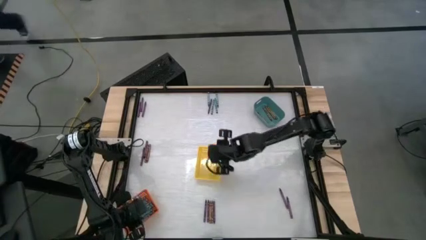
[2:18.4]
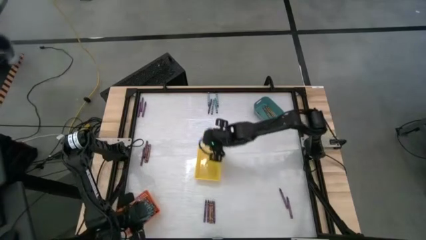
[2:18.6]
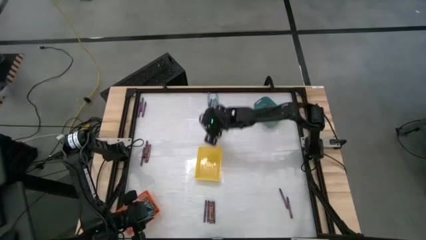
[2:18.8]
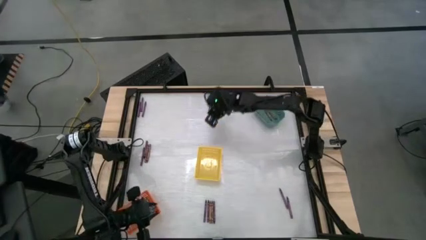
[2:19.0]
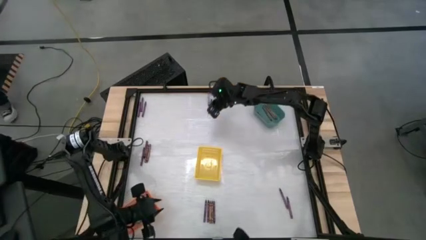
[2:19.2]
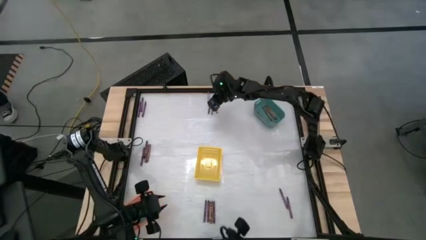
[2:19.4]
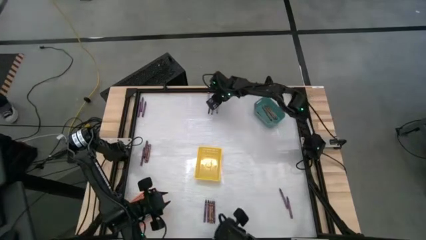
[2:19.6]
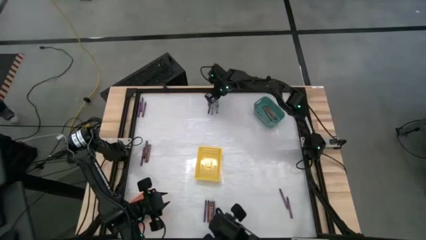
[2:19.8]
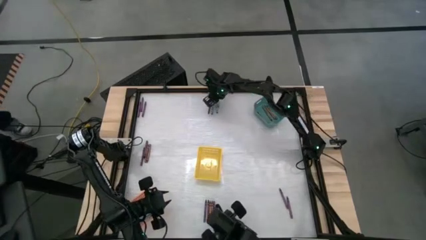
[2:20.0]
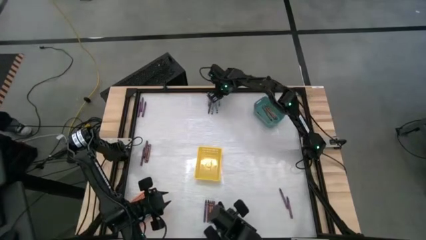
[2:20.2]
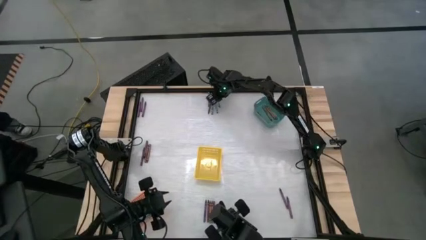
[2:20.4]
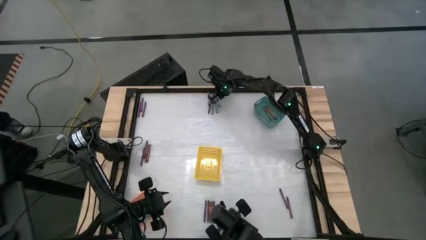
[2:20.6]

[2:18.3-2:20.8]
Task: Sort crayons
Put the dark blue crayon into the orange basket

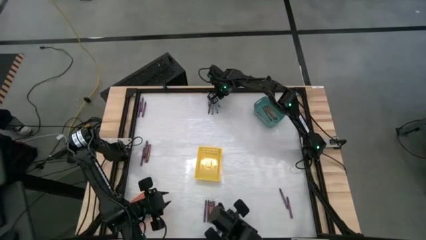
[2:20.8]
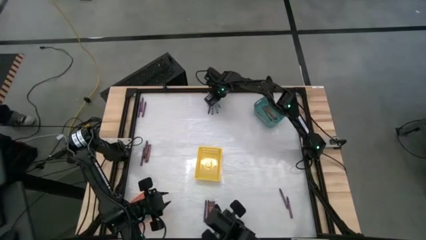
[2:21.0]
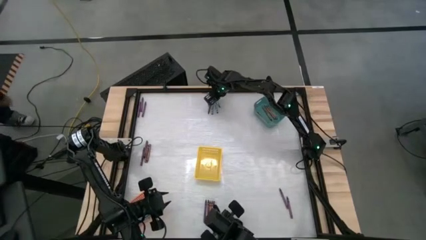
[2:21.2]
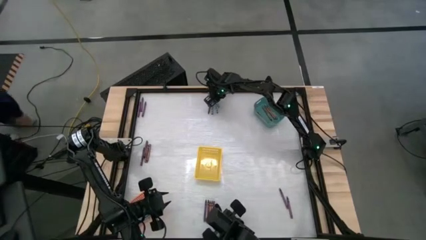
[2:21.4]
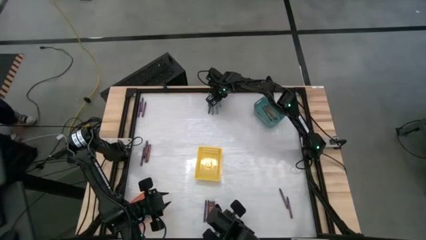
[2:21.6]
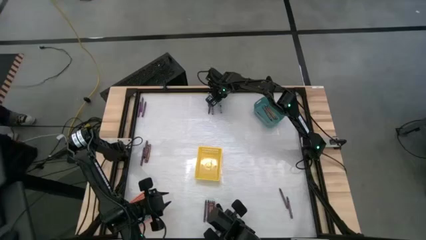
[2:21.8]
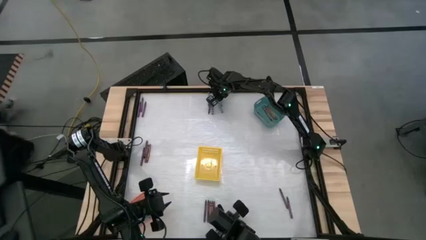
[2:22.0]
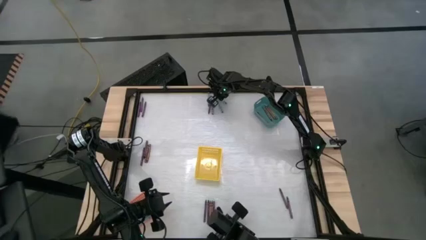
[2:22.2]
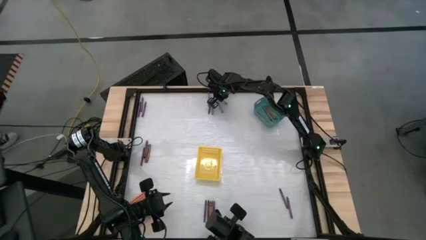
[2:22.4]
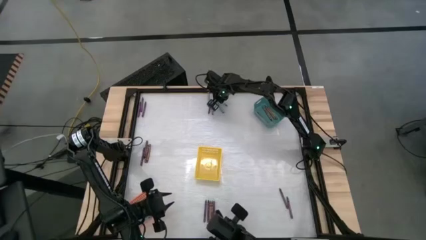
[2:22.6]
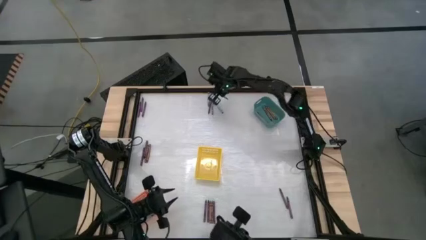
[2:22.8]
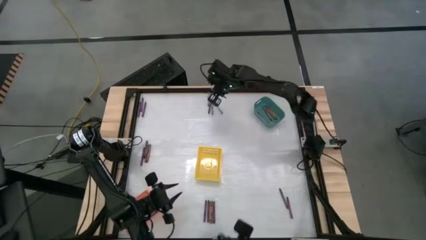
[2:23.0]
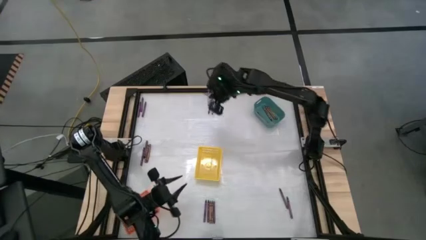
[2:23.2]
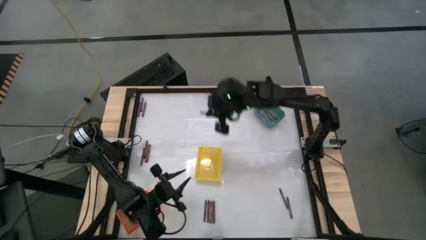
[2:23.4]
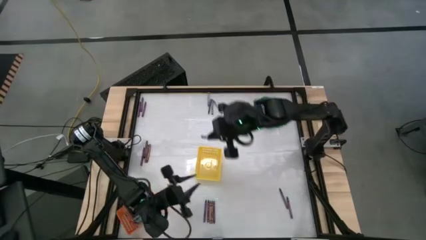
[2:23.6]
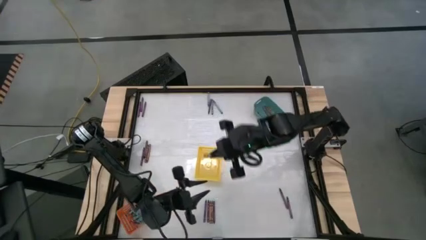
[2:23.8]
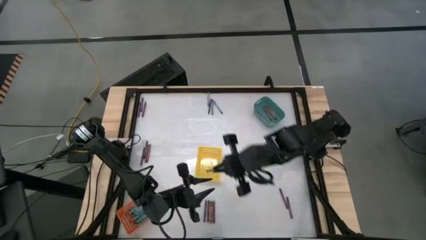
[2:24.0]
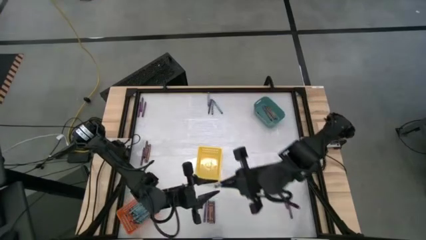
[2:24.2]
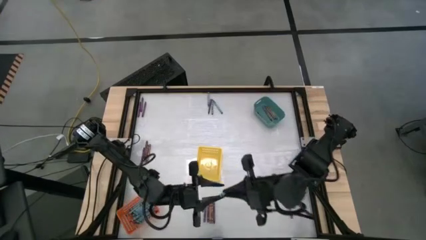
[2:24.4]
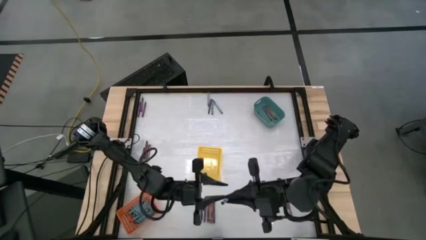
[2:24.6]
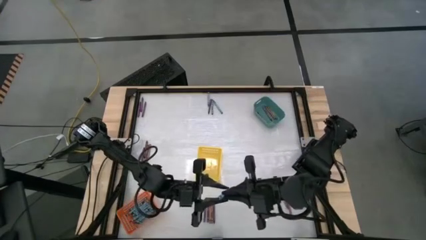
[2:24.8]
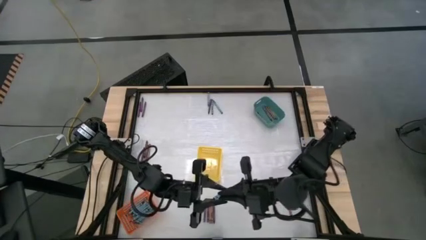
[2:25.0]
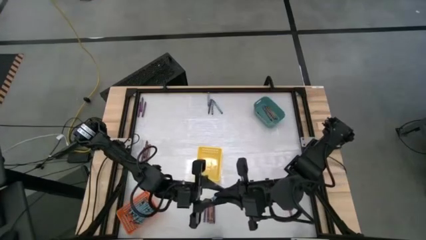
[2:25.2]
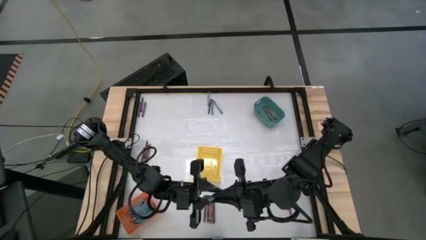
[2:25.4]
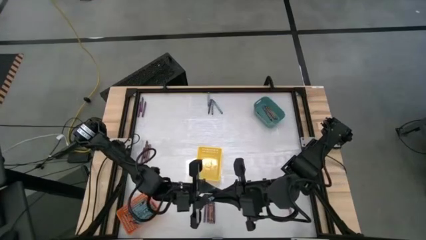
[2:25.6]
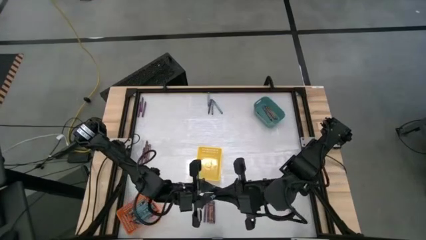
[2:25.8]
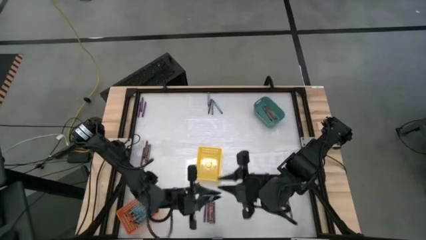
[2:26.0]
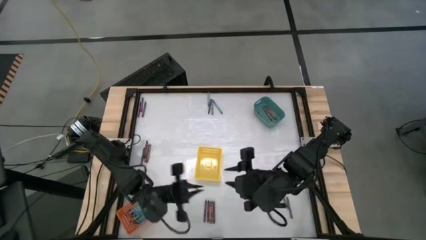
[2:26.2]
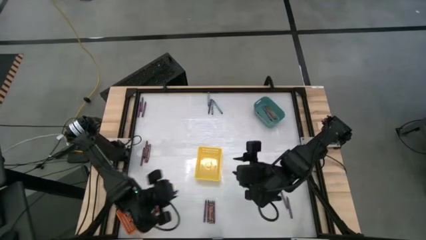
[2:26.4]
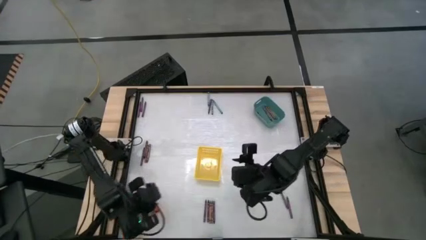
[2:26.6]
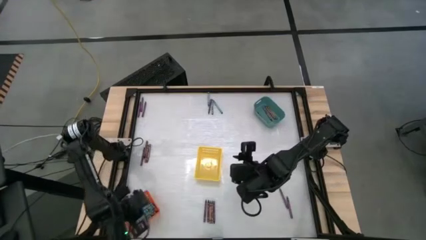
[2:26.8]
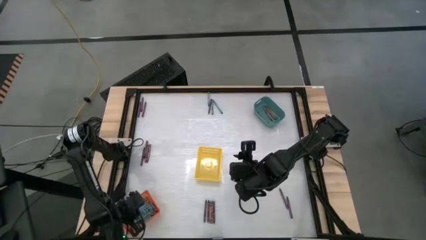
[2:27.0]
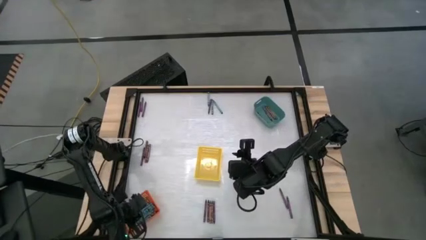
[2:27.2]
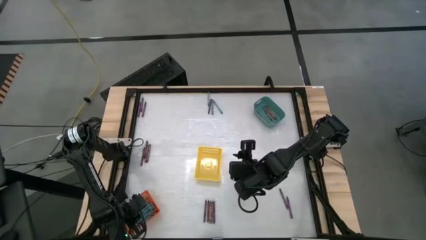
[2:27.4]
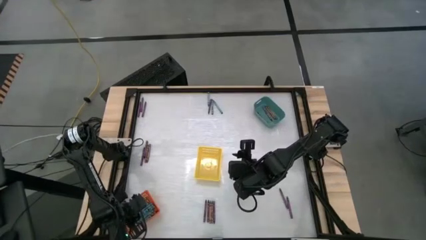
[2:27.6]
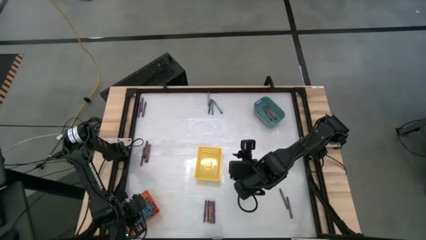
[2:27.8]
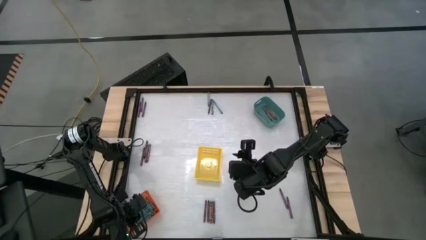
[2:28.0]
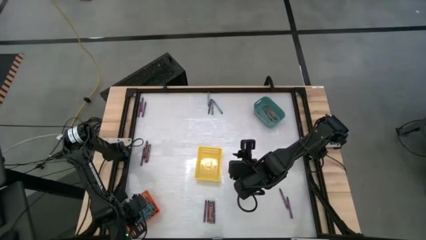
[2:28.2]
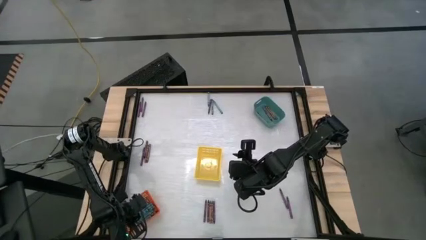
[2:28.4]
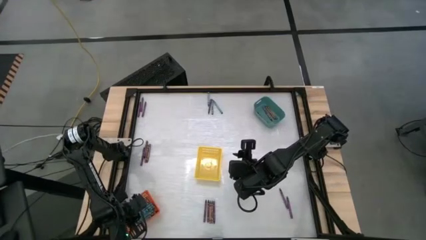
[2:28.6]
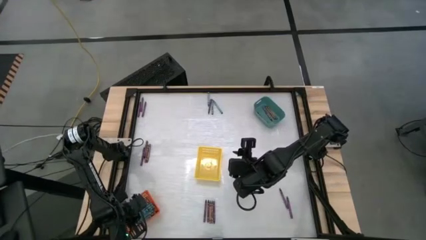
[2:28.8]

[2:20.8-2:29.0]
Put the dark blue crayon into the orange basket

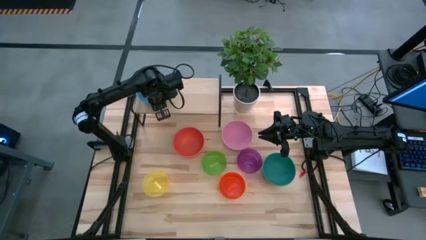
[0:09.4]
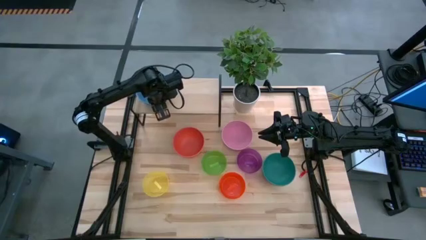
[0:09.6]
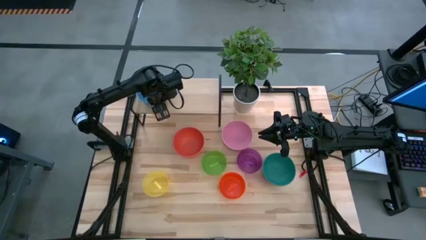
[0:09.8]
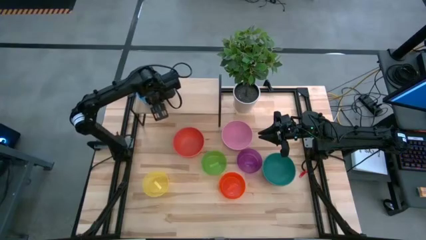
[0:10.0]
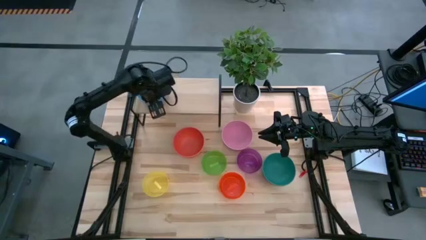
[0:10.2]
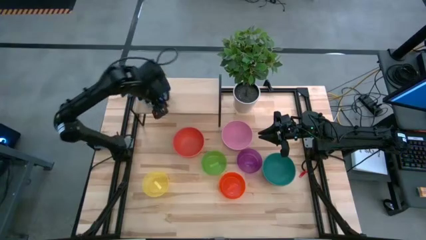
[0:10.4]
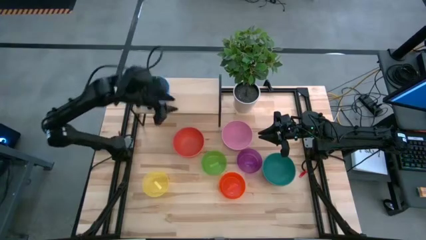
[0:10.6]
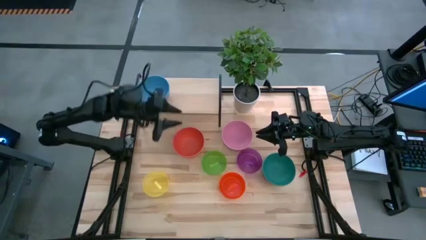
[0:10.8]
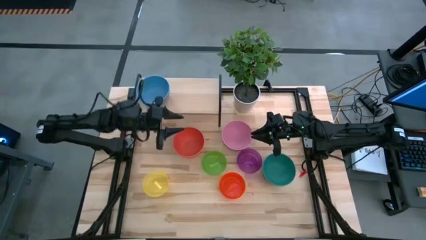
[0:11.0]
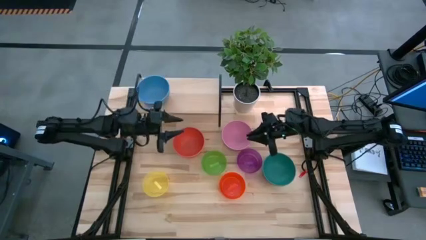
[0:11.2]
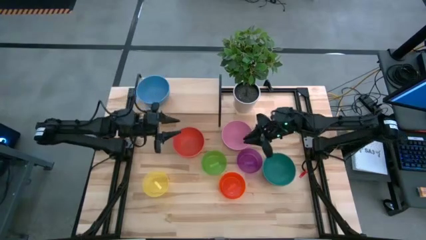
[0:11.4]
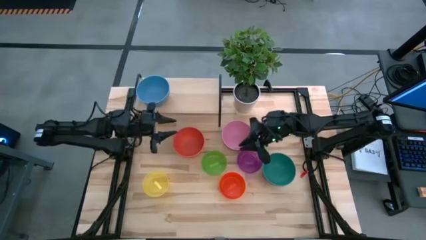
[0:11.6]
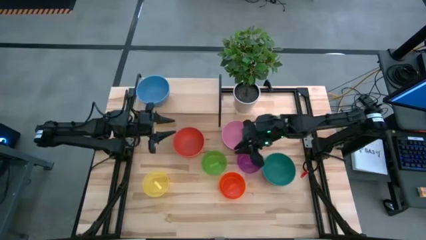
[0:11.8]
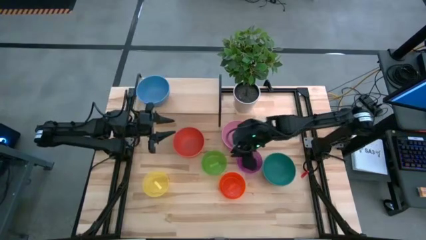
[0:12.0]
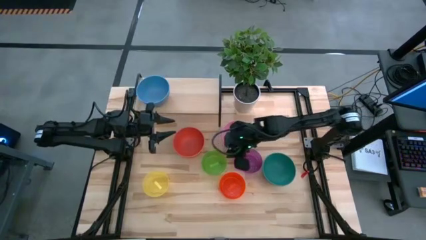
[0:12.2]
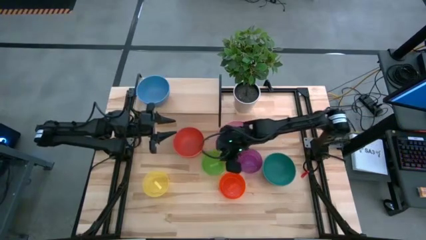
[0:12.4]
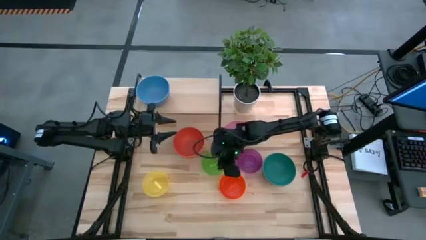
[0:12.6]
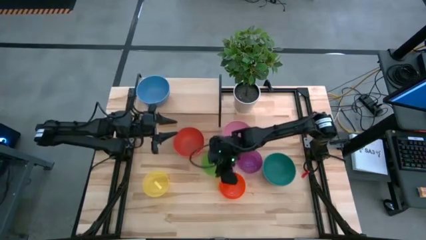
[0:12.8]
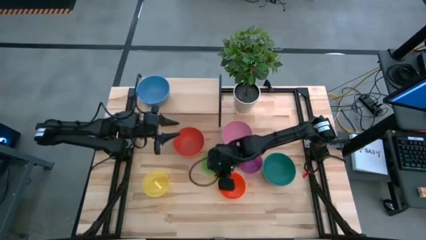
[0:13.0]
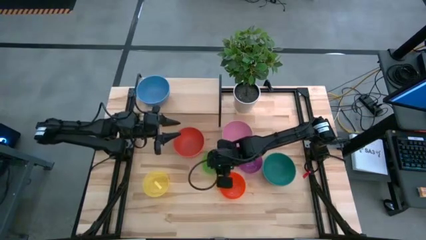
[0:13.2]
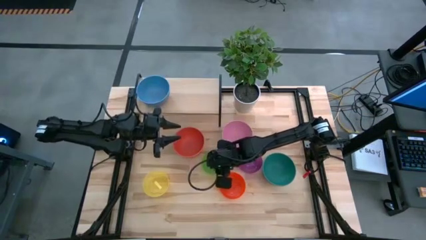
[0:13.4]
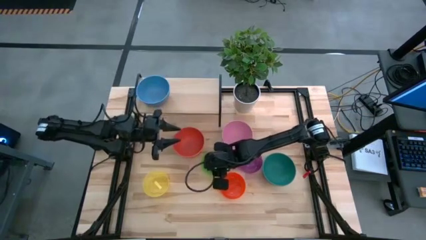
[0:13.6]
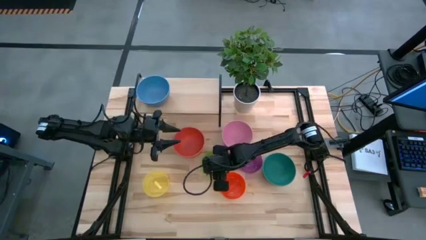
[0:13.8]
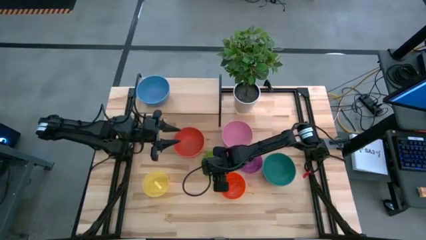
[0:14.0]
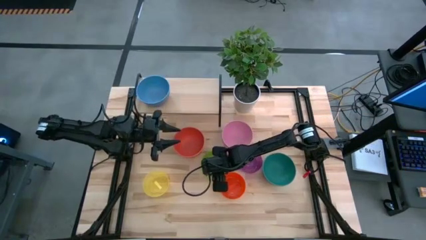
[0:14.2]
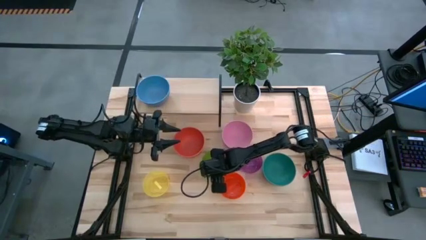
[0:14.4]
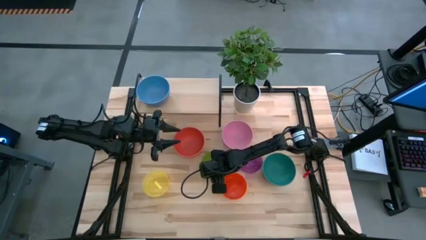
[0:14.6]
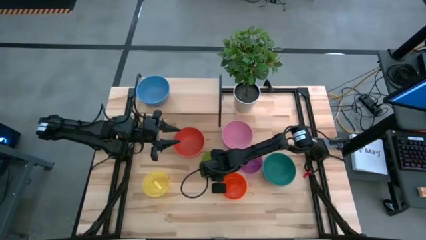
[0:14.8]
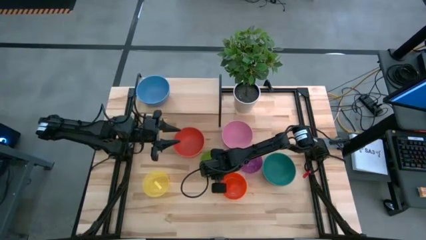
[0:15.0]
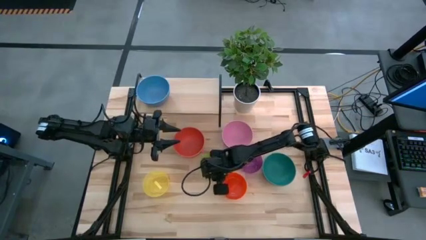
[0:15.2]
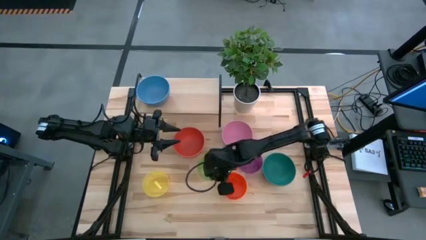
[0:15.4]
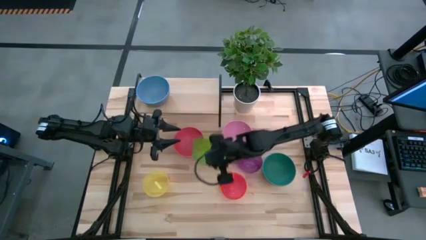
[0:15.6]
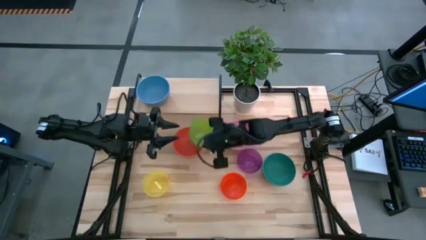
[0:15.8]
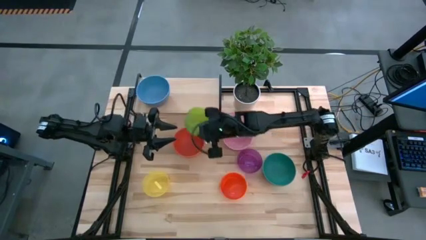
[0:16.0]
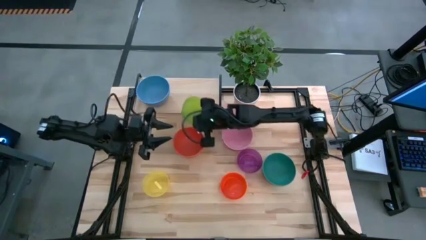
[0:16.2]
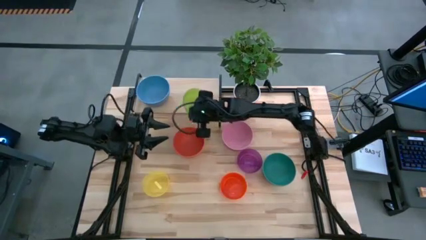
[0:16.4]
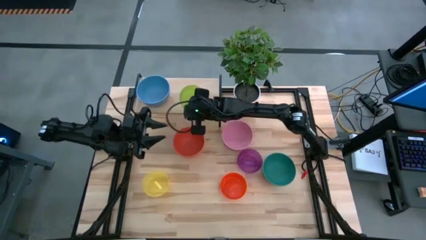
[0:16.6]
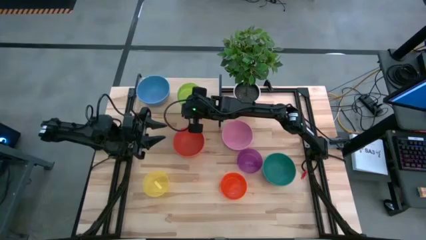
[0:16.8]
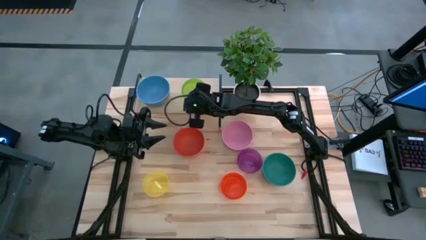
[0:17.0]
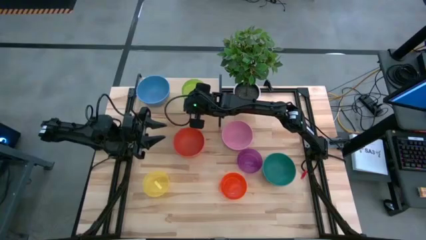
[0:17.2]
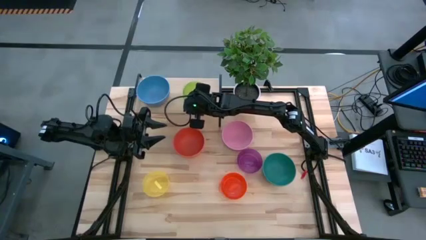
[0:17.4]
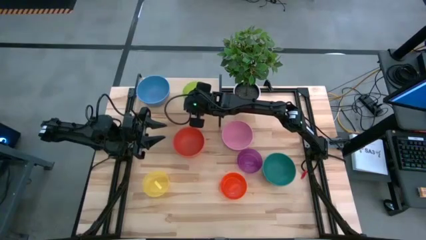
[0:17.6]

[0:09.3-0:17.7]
Task: Place and stack bowls onto a shelf
Put the transparent green bowl on the shelf
